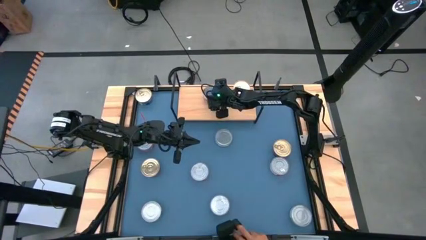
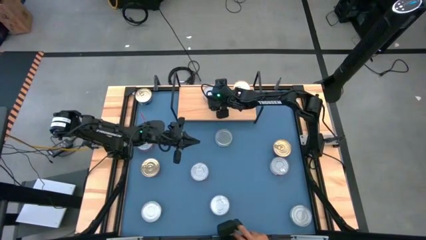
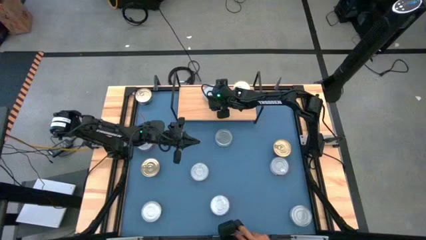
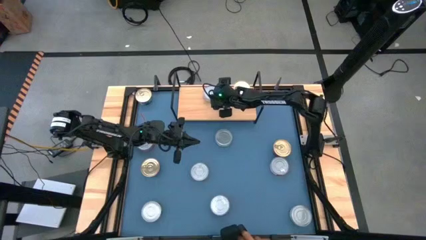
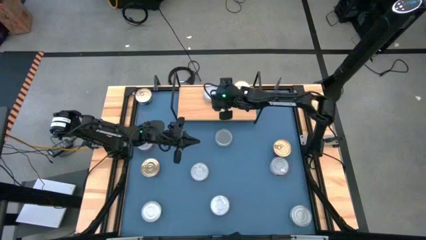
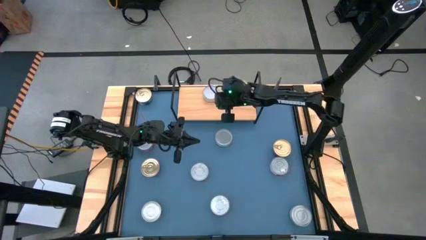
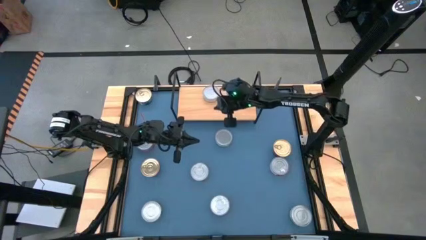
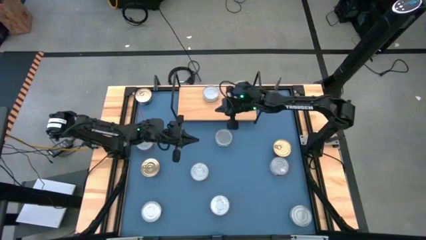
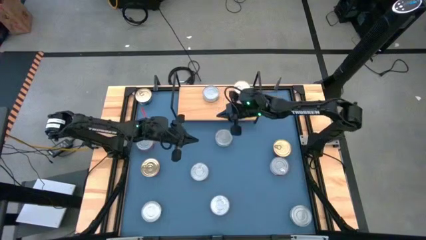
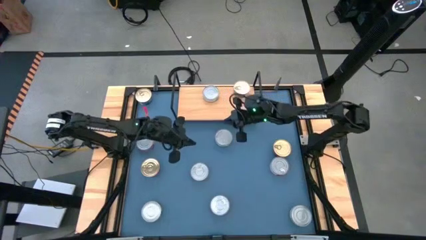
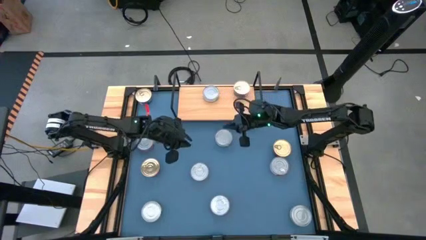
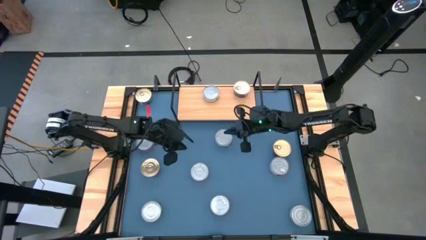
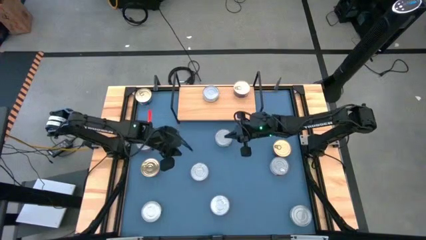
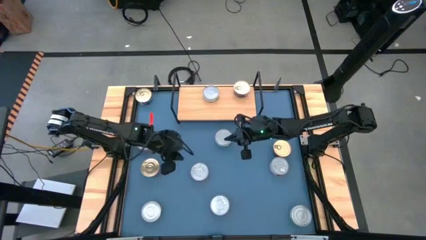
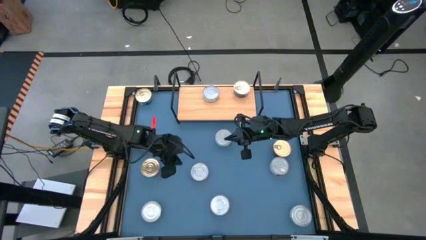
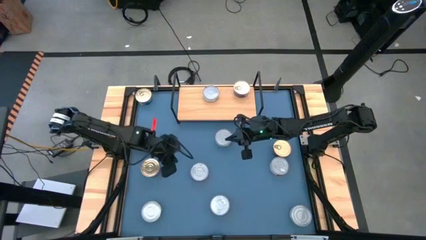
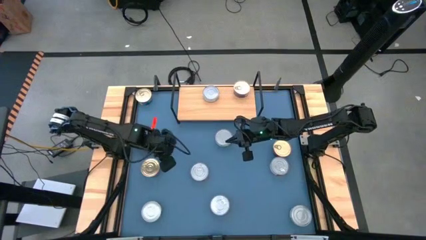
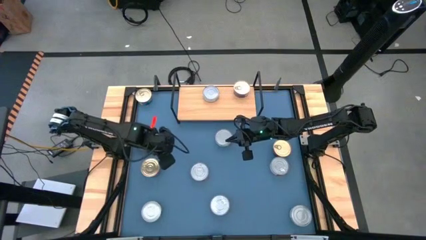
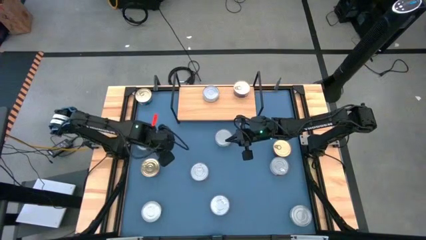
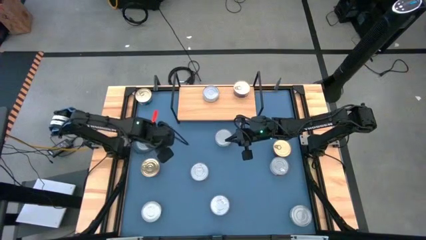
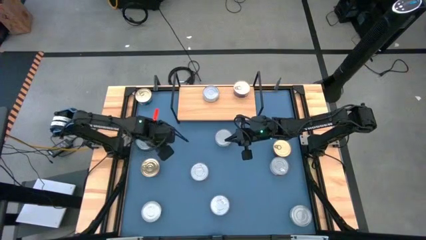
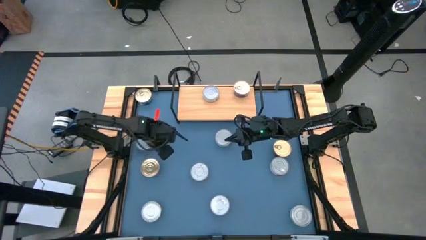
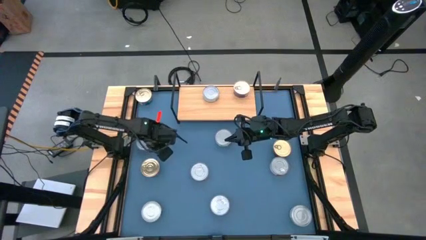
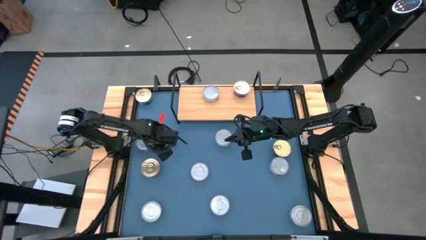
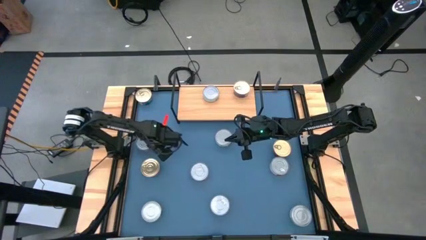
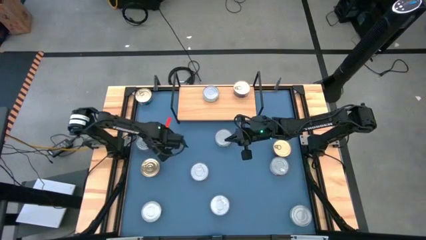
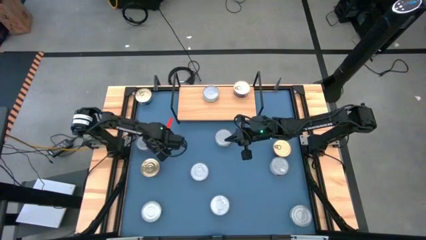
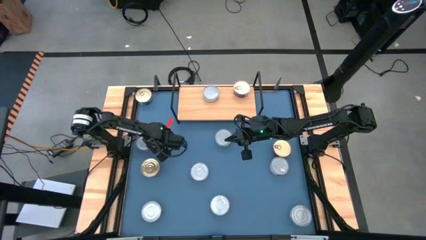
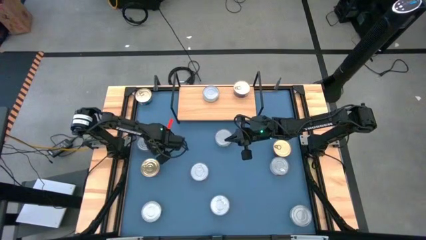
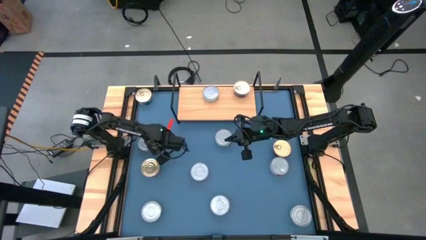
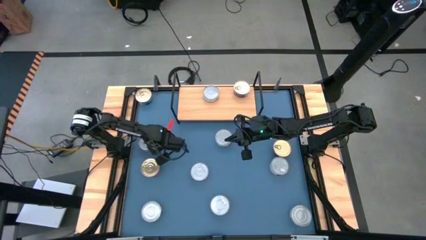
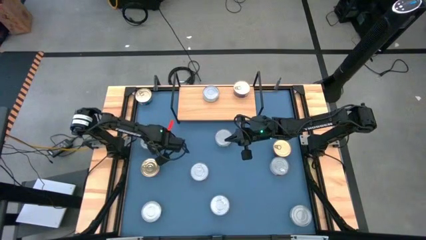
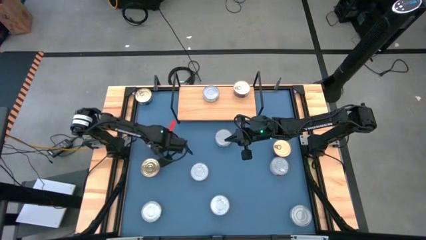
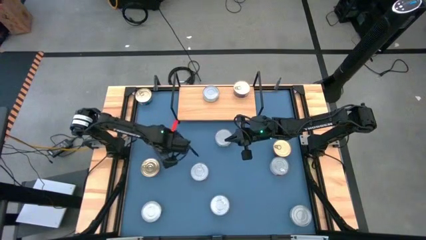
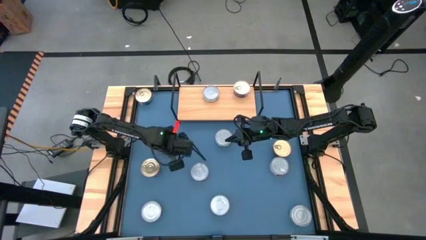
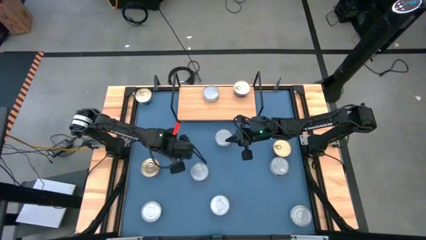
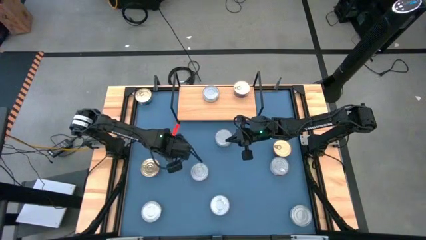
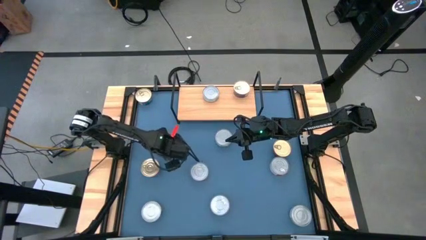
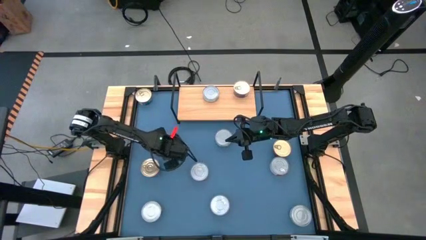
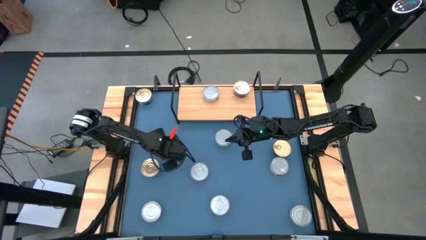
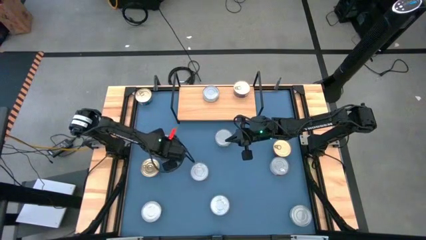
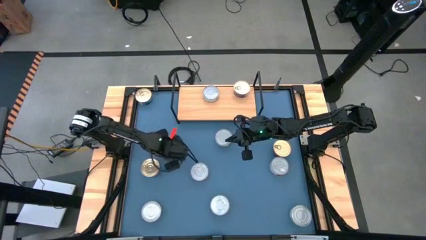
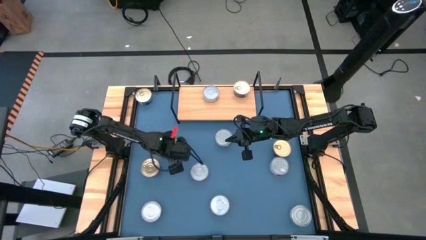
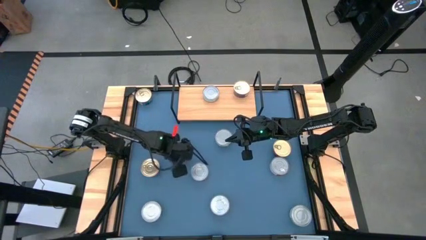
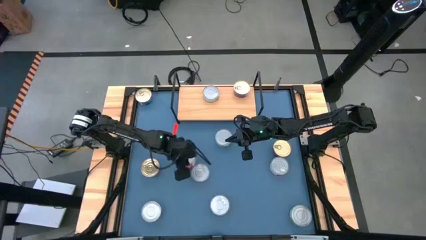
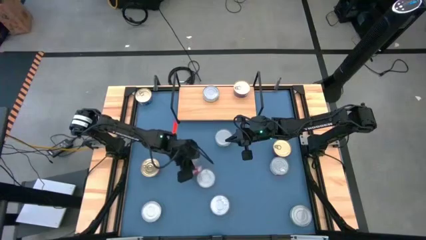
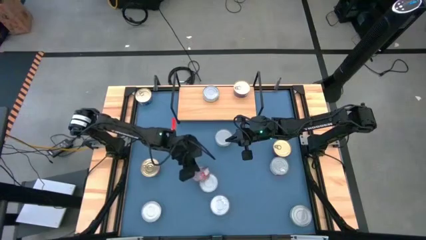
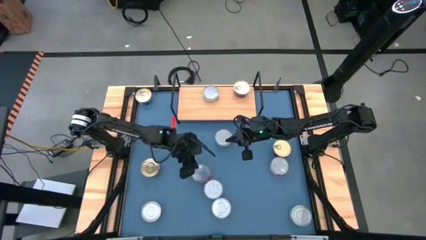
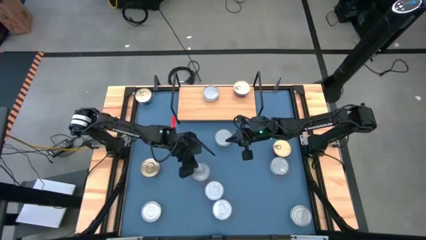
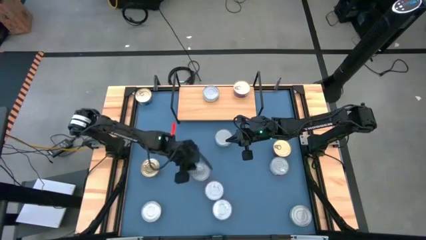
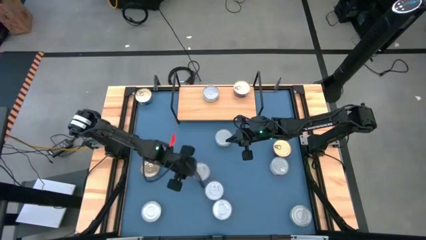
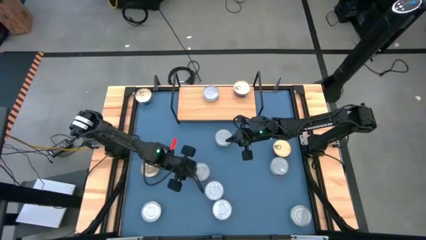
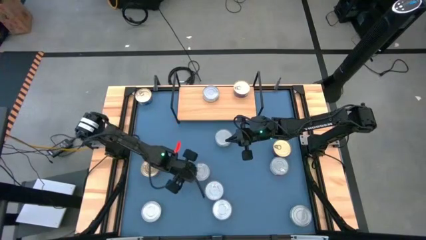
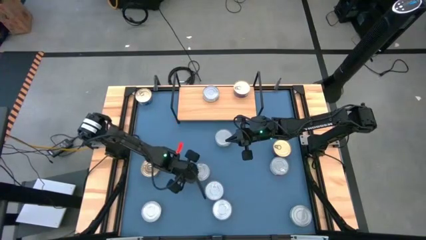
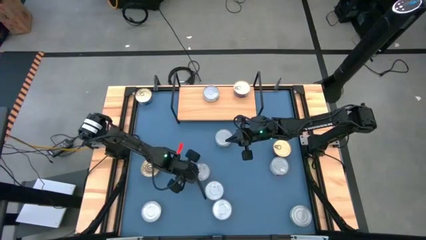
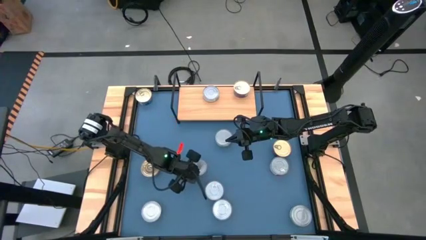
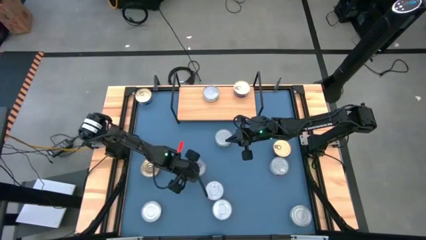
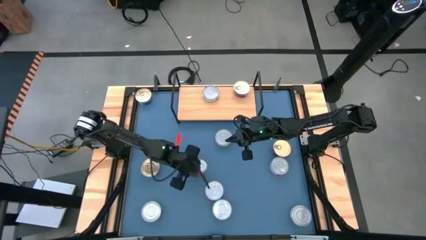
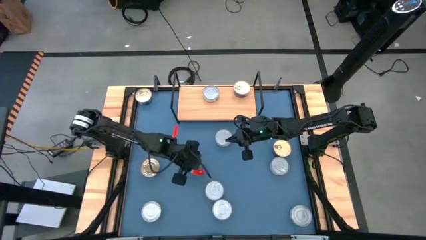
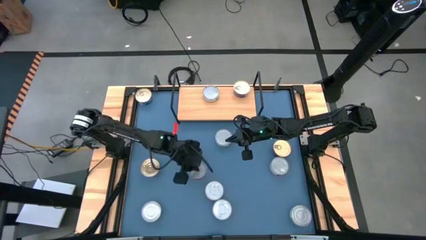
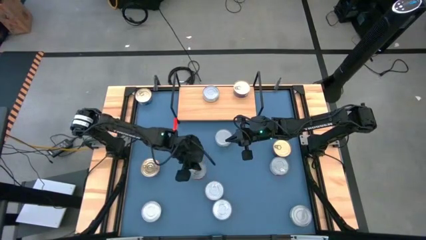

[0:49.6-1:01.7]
Task: Stack canned seafood by type on shelf
Put the red tuna can on the shelf

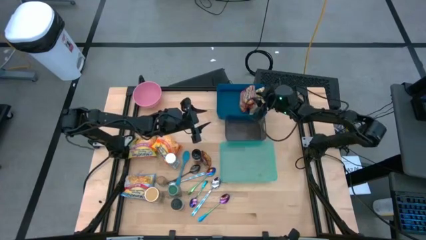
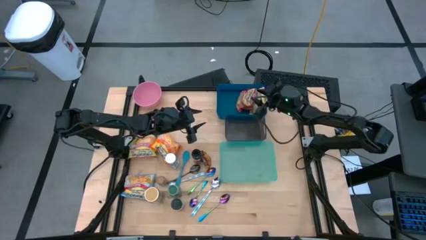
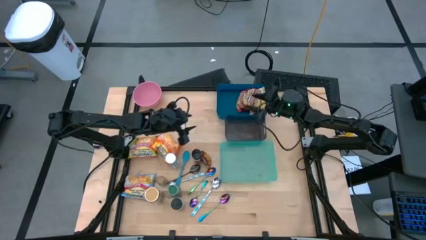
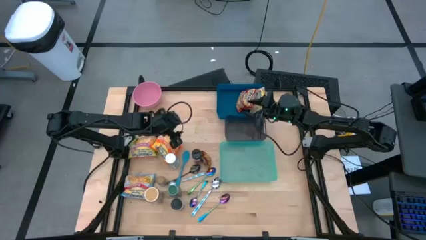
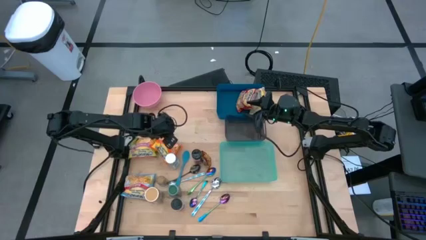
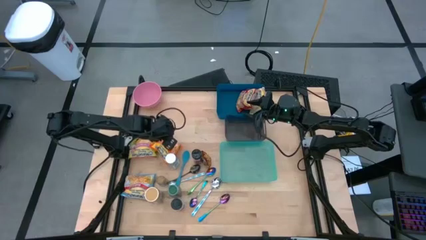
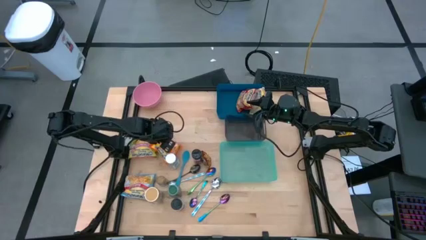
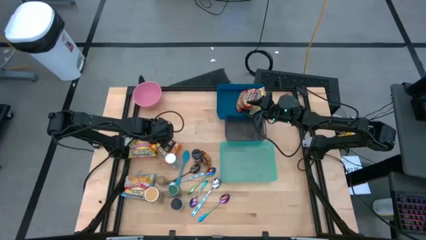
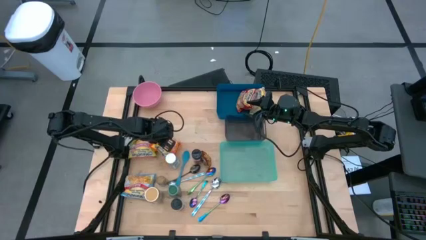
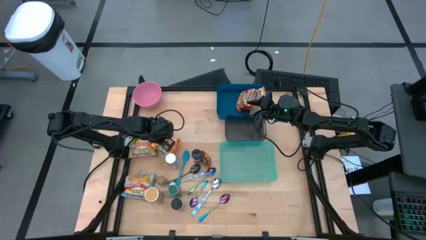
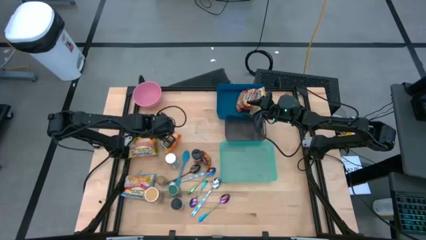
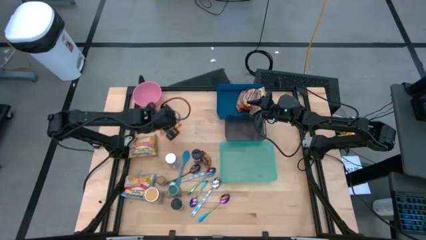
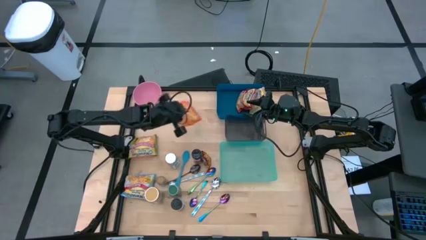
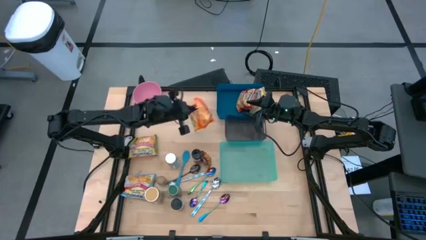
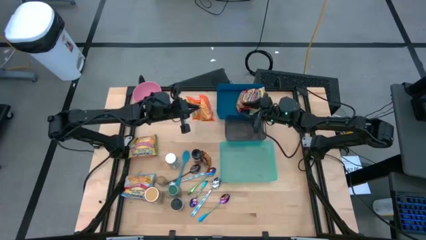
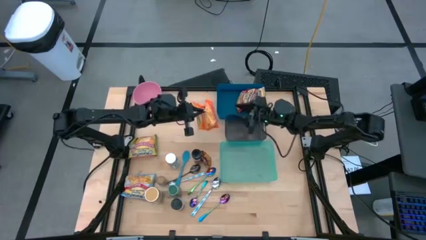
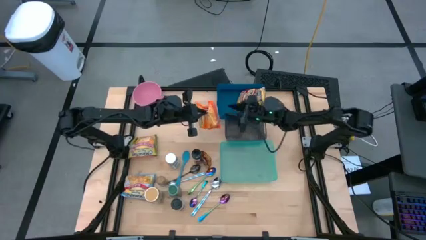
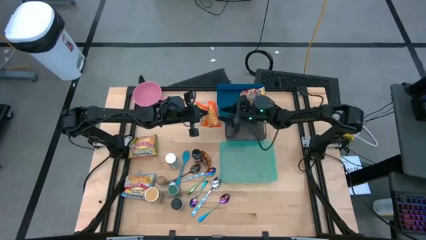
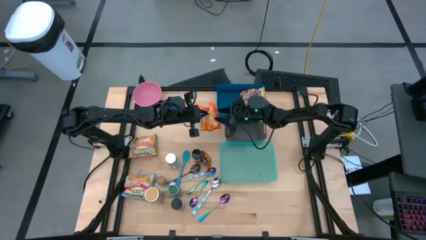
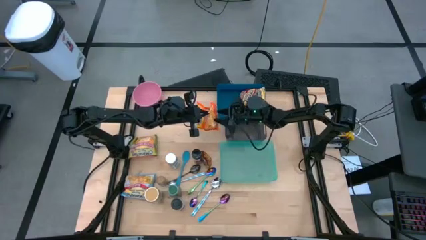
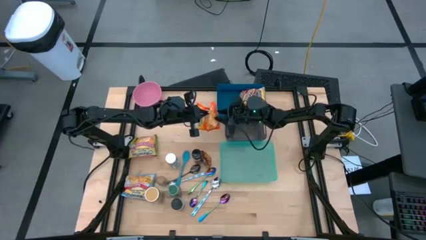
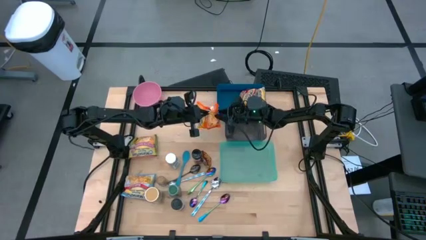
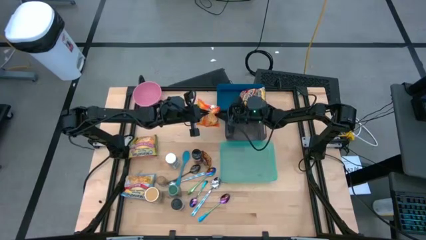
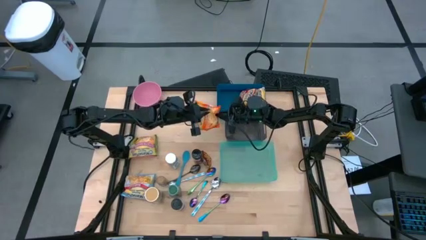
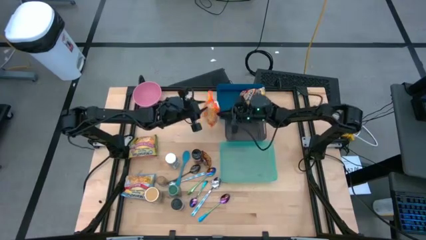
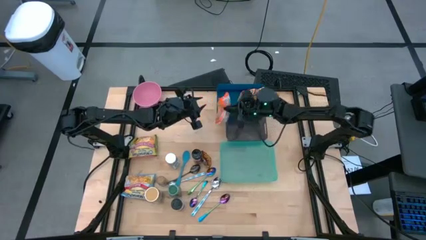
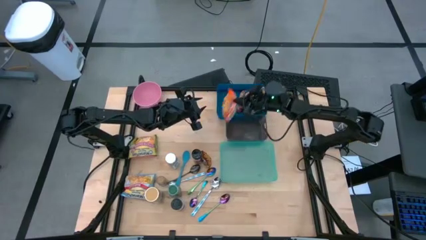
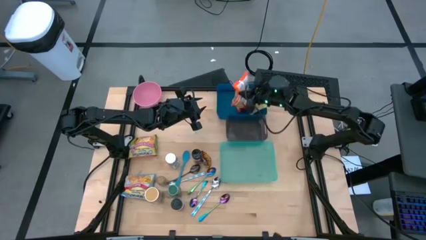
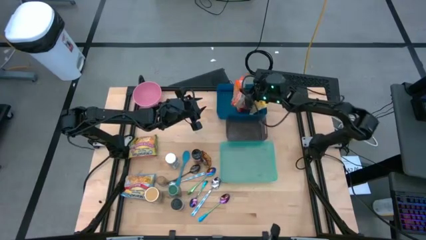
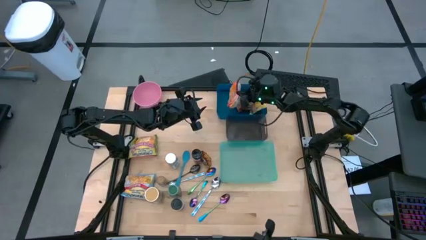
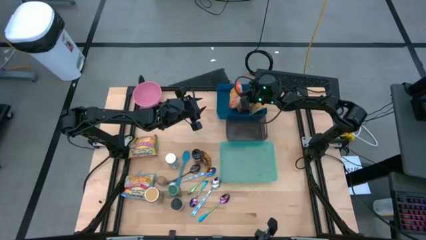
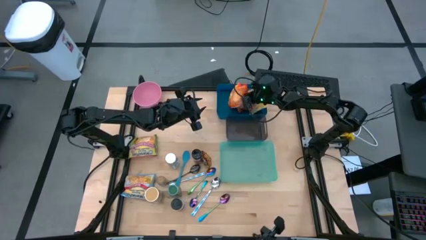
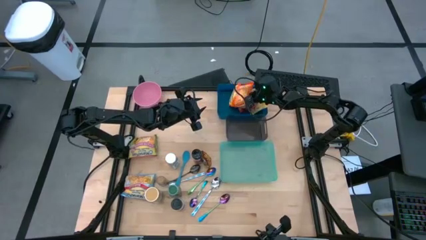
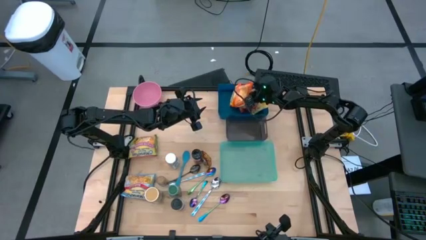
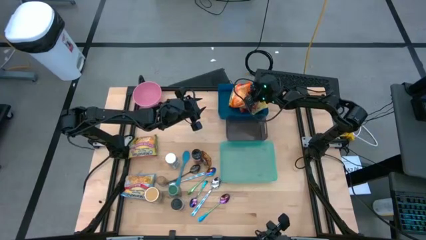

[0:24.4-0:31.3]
Task: Pick & Place Food Item
Put the orange noodle pack into the blue bin
